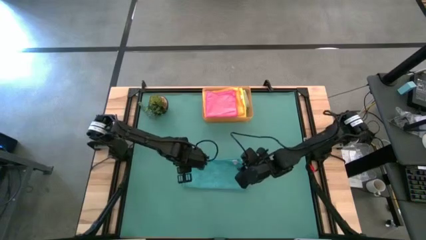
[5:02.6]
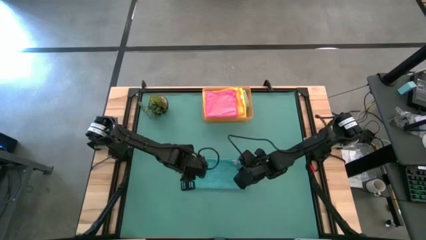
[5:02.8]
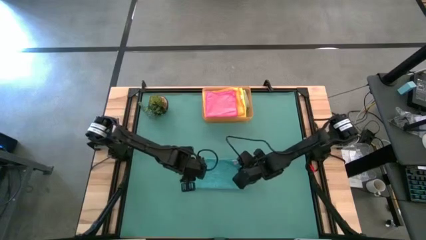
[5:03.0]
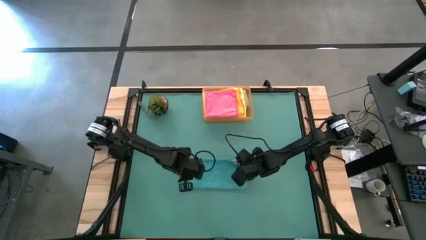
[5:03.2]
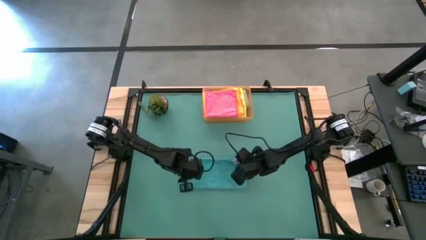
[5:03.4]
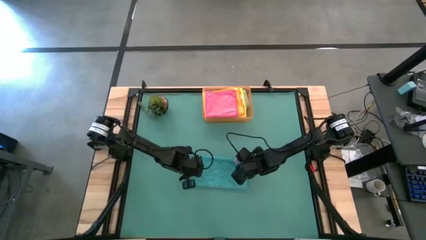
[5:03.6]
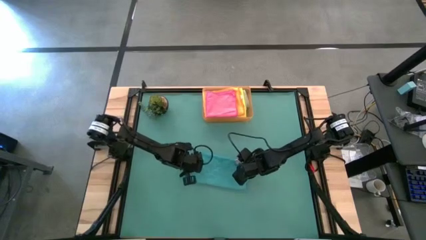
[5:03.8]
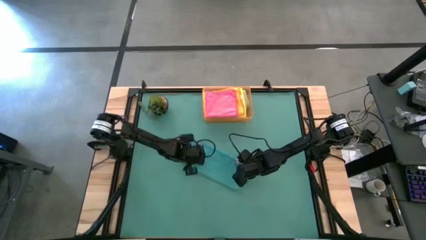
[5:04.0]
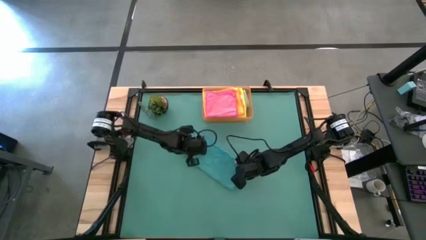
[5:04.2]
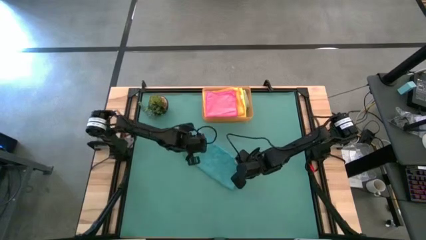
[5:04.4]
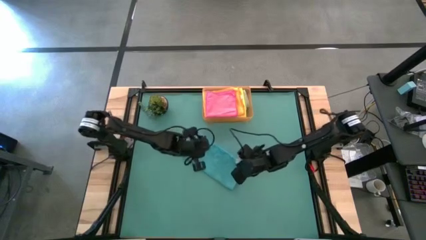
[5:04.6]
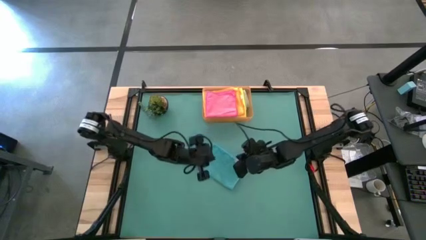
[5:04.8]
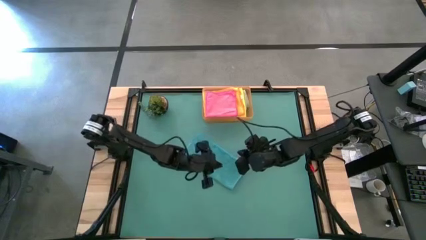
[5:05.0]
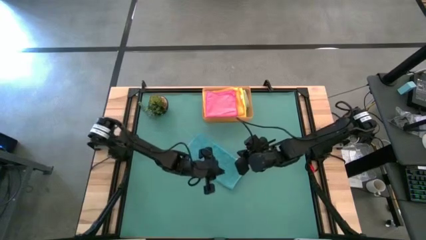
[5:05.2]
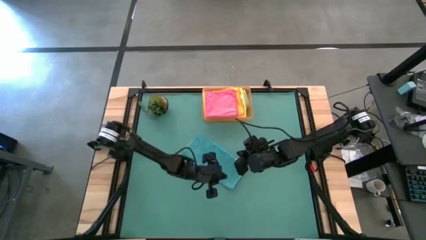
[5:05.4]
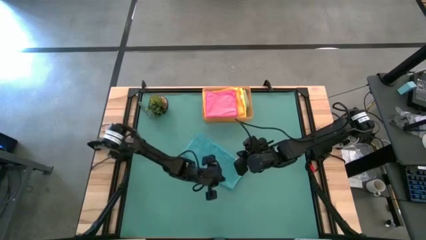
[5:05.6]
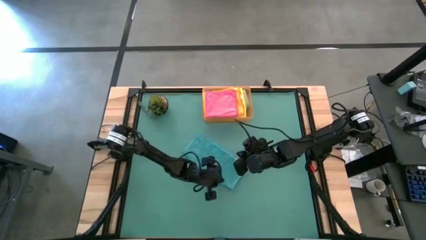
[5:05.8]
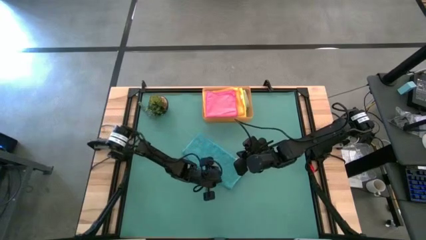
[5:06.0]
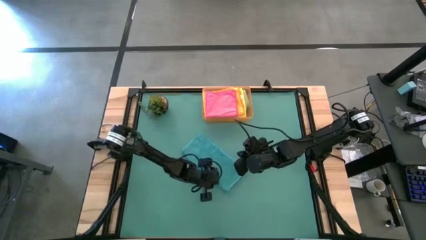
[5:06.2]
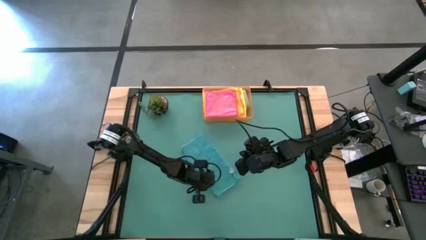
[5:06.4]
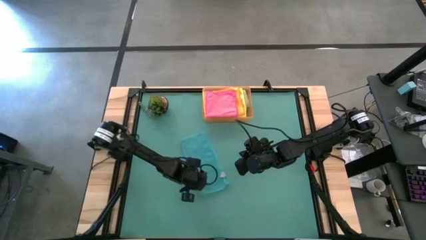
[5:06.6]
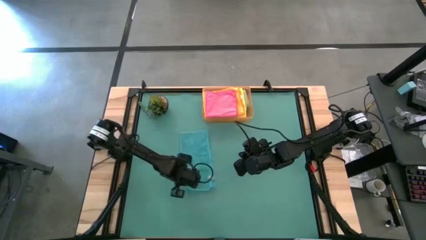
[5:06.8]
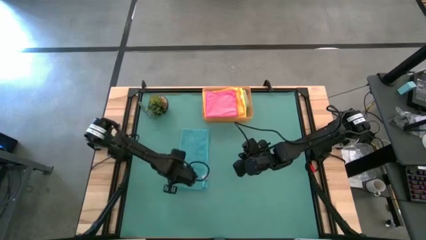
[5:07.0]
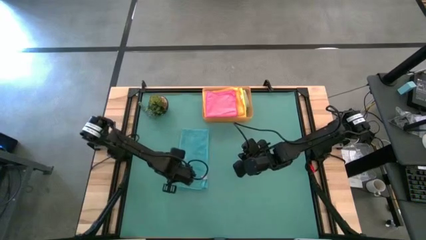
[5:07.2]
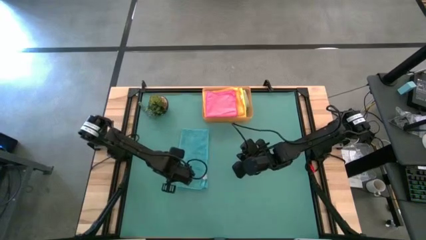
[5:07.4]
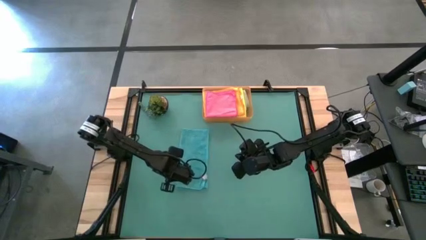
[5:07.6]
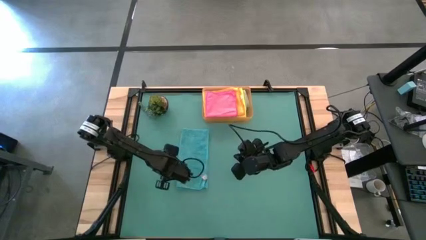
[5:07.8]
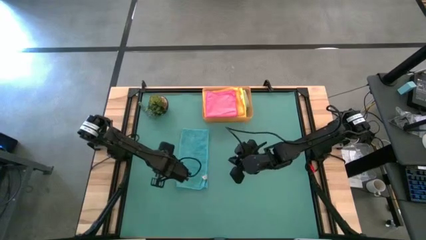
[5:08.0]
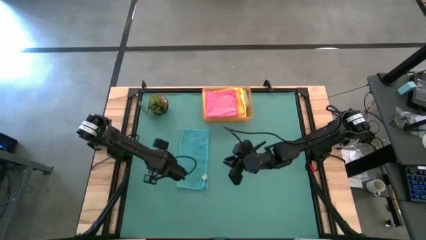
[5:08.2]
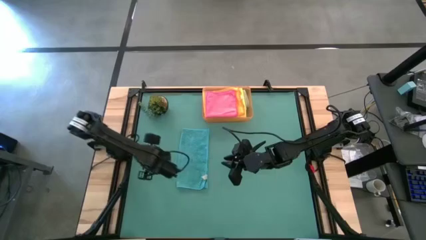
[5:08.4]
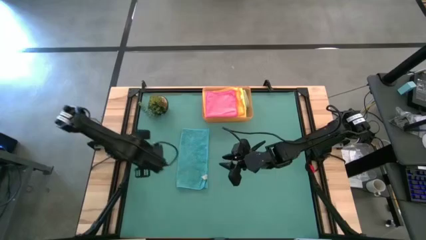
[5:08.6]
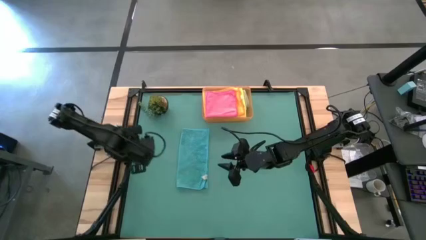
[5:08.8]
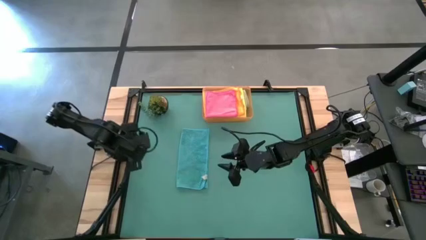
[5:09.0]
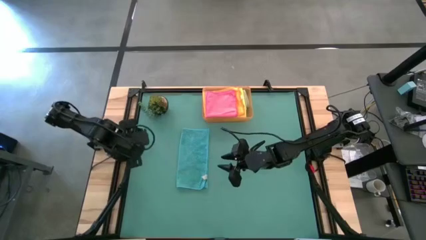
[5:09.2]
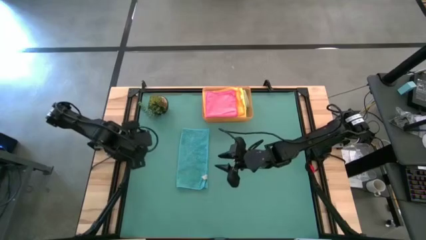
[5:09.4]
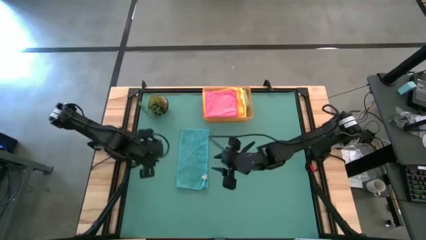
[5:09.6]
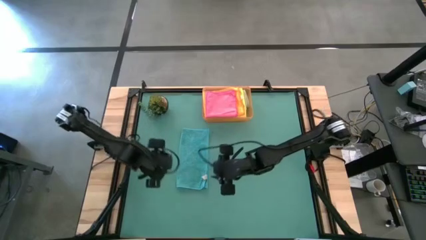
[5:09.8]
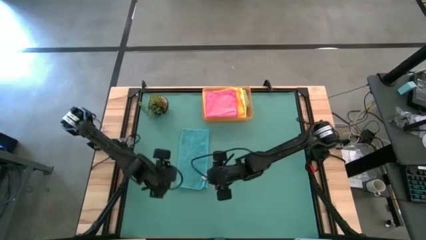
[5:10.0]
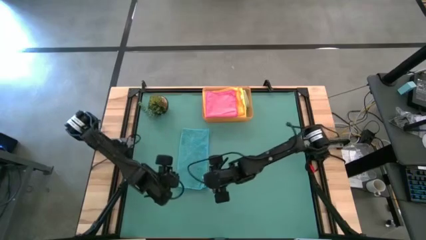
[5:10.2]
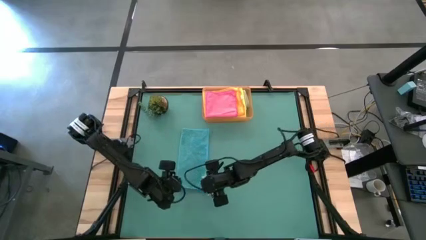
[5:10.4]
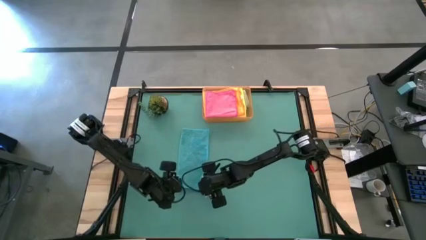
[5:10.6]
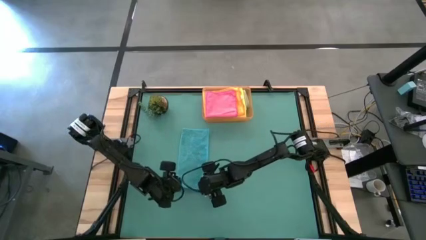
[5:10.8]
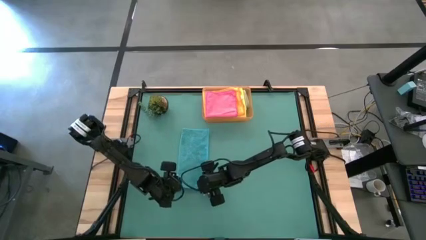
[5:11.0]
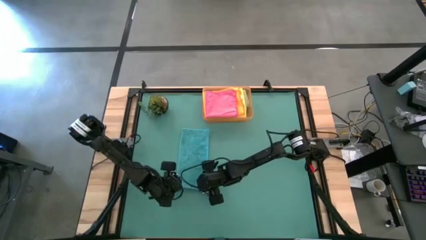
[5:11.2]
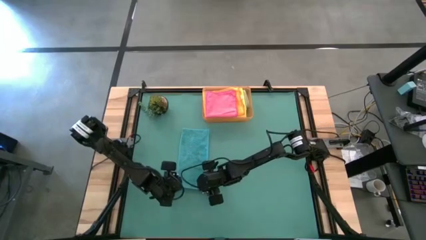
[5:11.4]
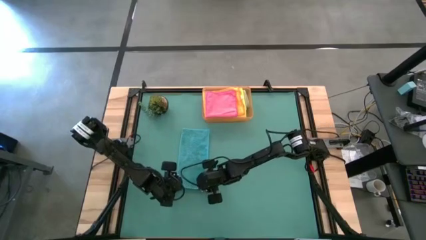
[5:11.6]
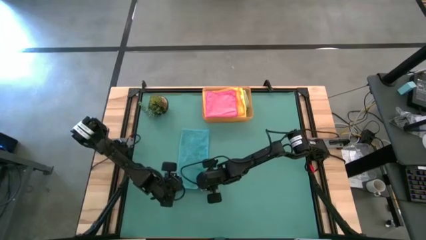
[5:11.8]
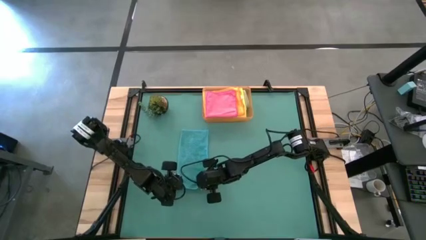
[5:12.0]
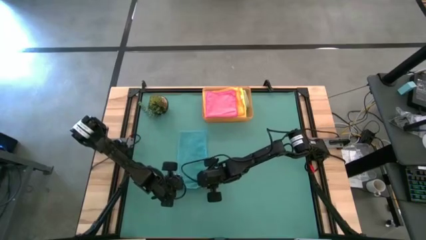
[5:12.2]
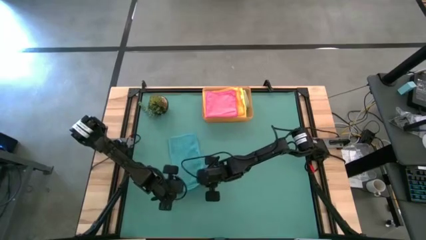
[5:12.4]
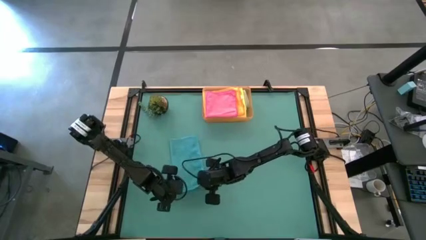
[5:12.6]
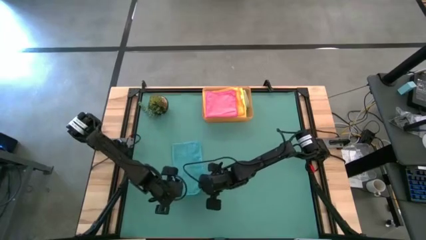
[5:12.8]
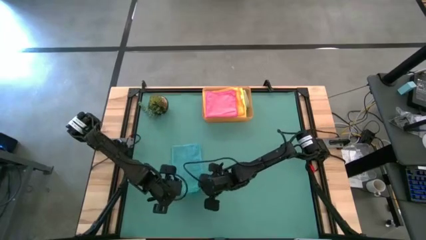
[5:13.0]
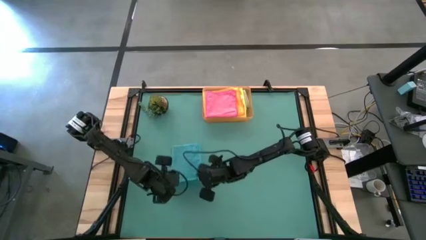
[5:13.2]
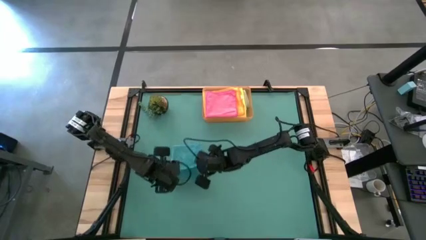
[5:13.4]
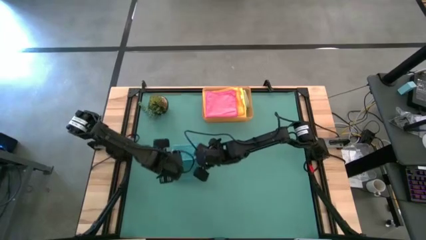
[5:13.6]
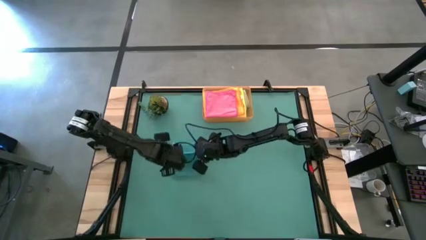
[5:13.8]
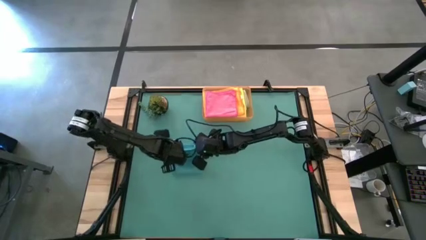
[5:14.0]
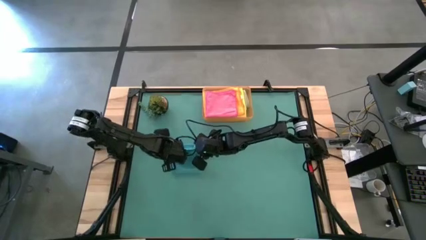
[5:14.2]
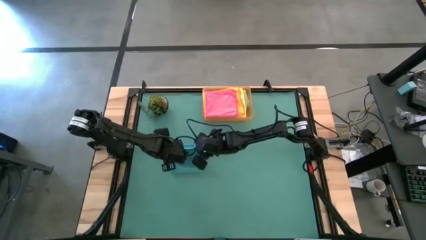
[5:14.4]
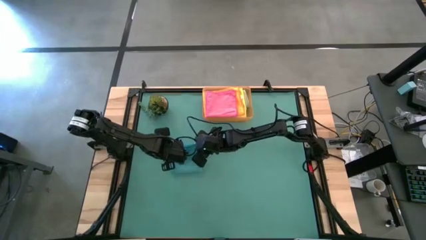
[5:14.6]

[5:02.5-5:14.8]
Task: Fold microfiber towels
Fold the green towel
